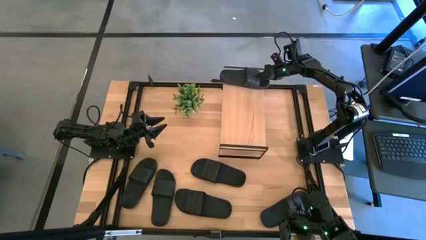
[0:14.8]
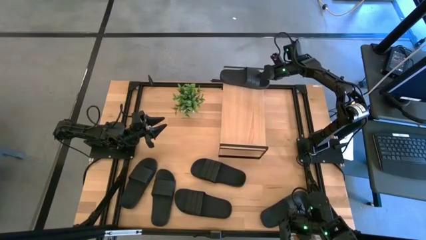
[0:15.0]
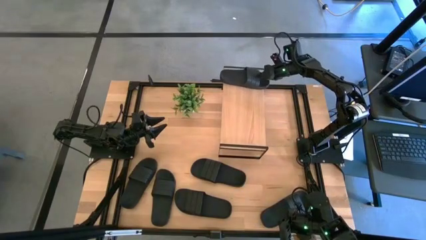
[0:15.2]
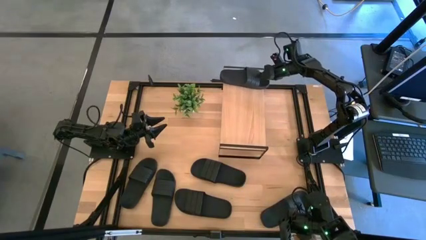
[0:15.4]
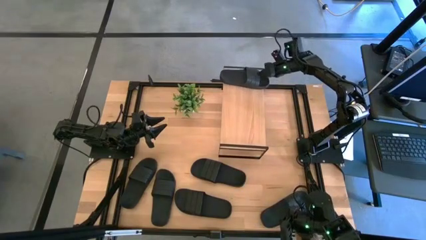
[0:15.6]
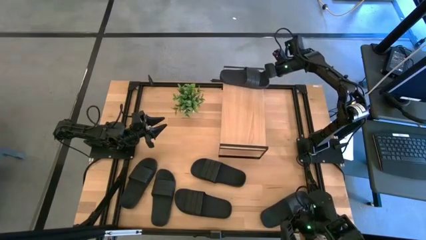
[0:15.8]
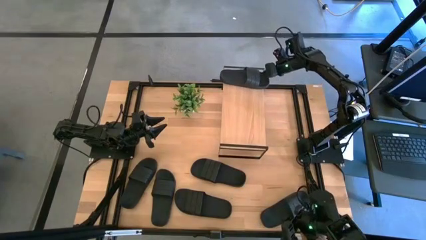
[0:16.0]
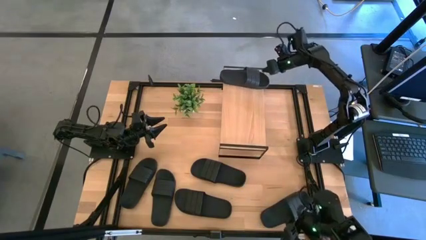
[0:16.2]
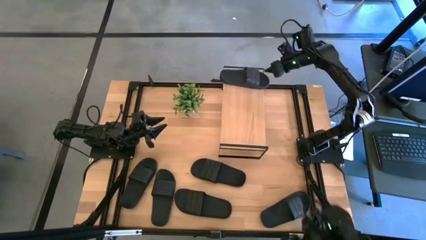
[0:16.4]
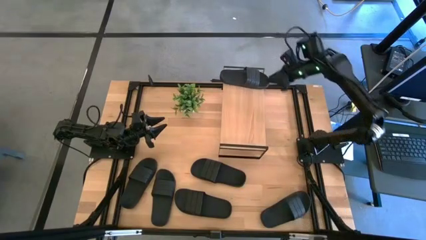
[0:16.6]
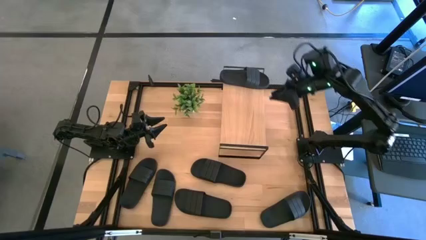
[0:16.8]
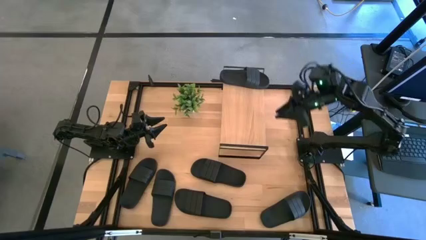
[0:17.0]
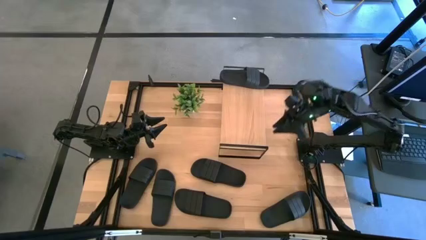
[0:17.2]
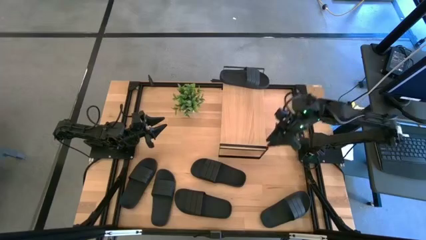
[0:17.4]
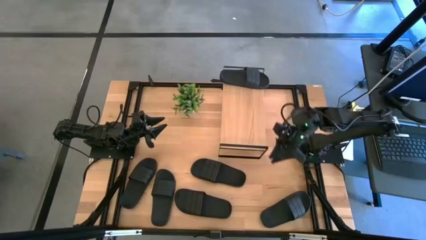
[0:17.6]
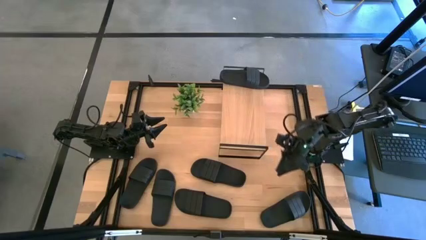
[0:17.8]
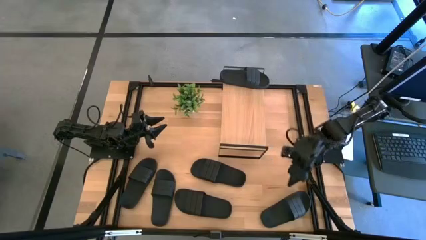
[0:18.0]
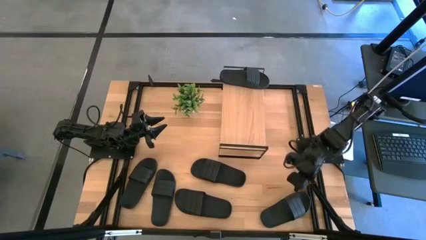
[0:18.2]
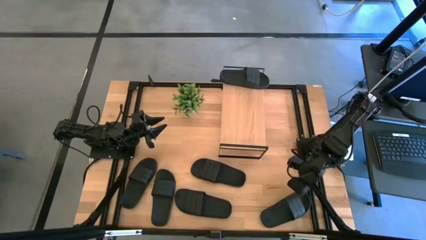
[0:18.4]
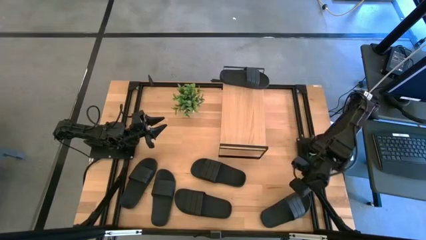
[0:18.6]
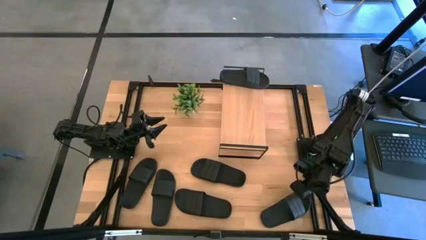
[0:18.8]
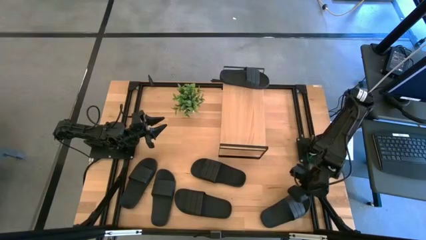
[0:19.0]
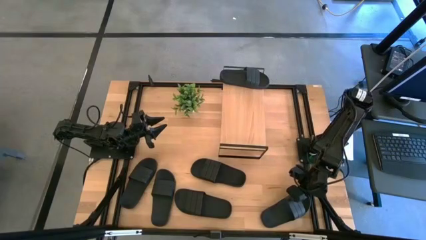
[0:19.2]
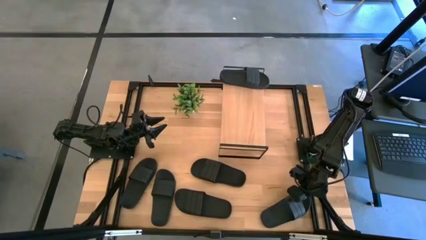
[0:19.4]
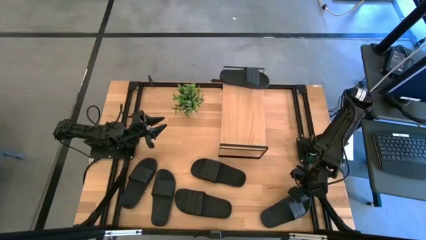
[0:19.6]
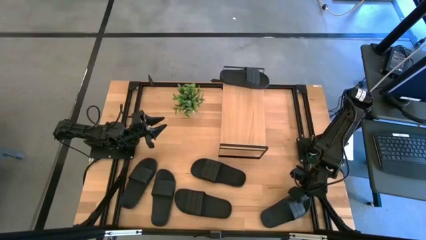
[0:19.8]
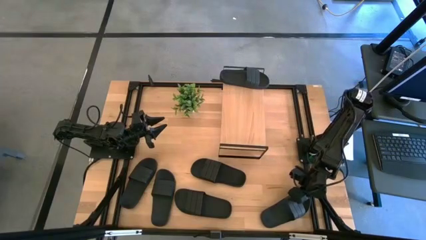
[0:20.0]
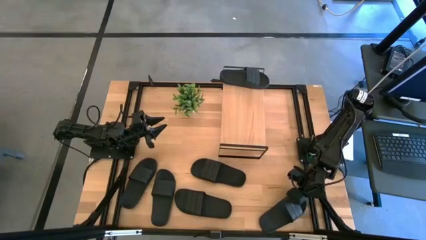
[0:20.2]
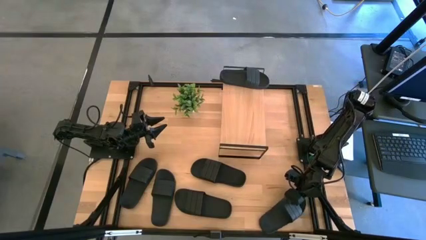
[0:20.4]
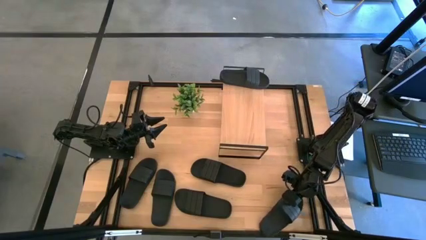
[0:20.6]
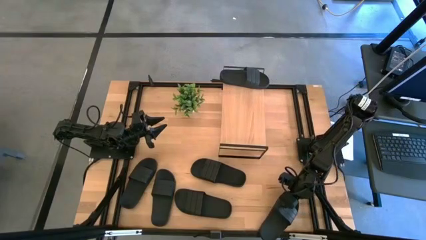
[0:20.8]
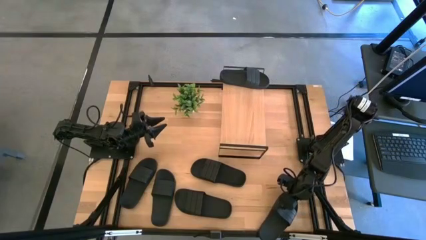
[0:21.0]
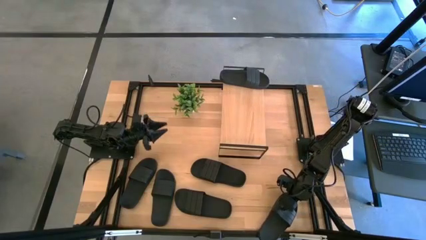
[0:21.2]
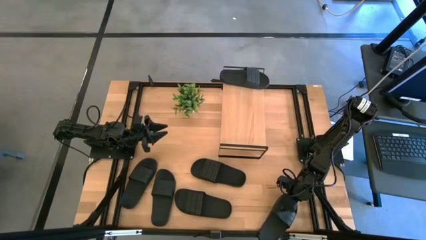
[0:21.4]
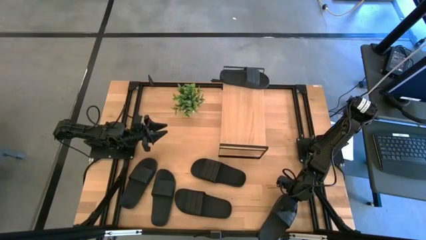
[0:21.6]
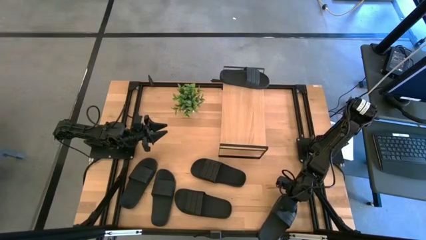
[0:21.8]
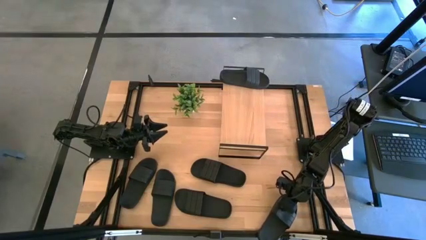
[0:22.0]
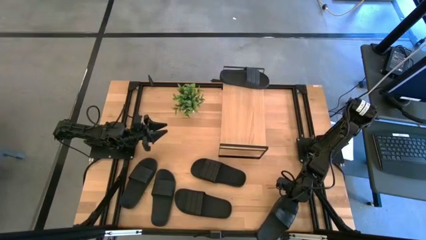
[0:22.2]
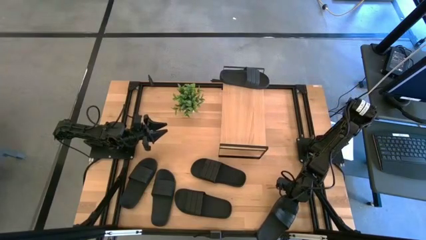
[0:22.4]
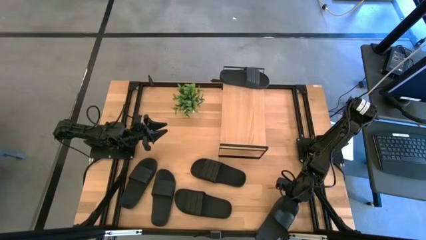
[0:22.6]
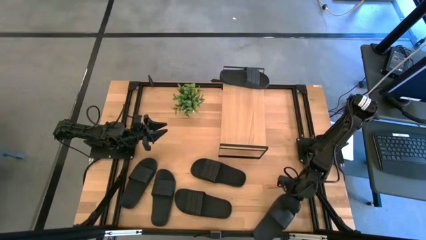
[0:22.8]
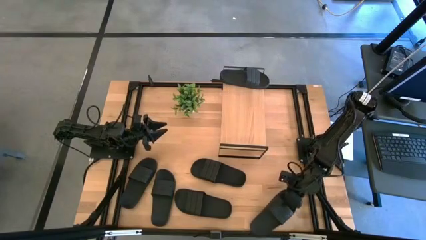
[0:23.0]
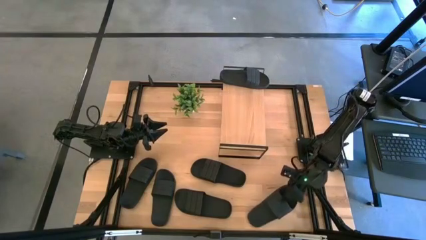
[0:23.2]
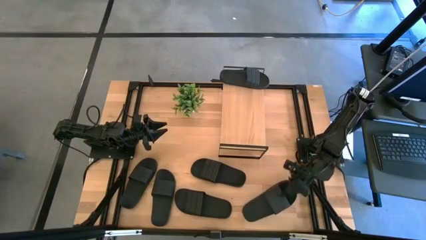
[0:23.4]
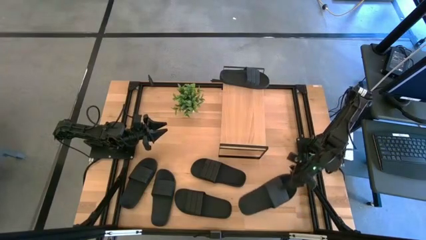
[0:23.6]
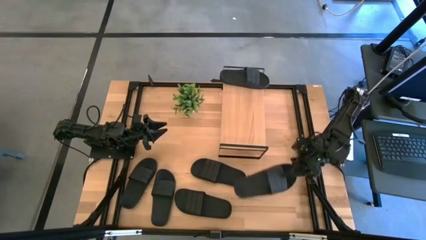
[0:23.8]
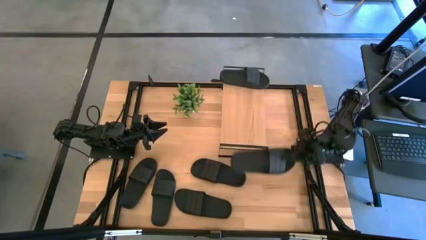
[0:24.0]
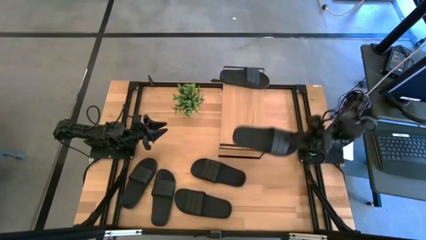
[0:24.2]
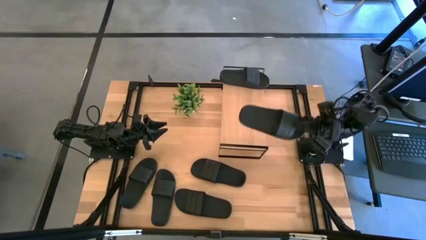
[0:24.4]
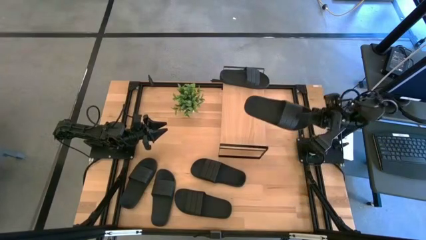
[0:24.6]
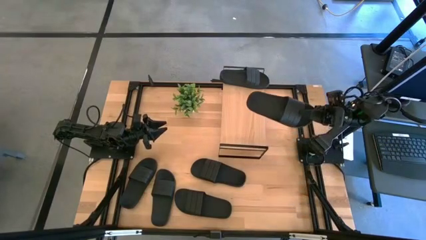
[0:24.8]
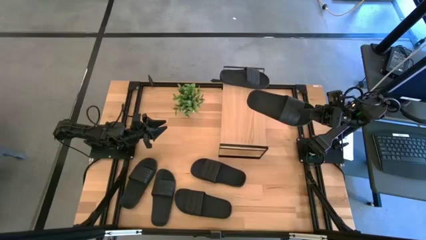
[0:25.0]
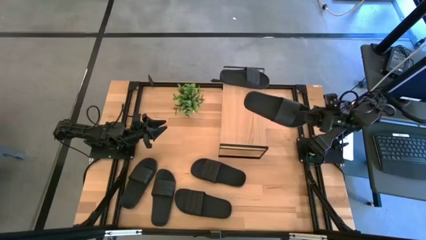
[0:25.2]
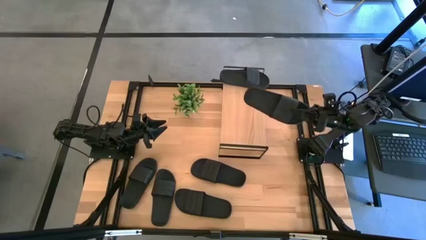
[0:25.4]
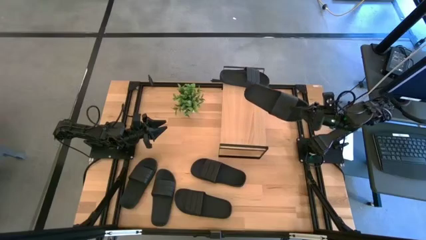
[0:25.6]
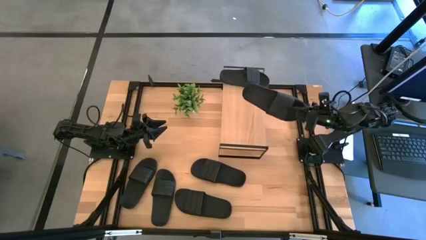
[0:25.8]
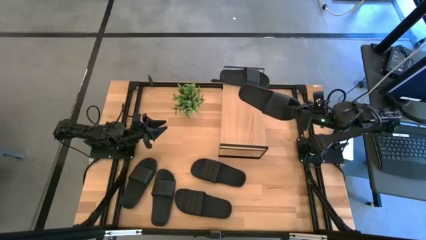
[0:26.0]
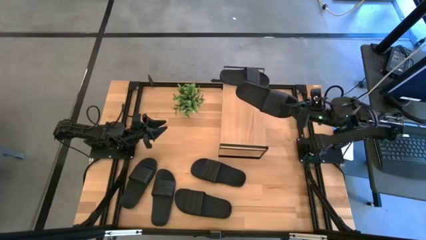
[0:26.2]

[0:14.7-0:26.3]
Task: Pick and place slides into the shelf
Put the black slide on the shelf
